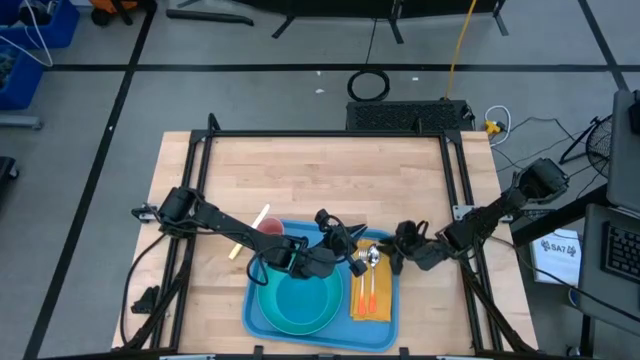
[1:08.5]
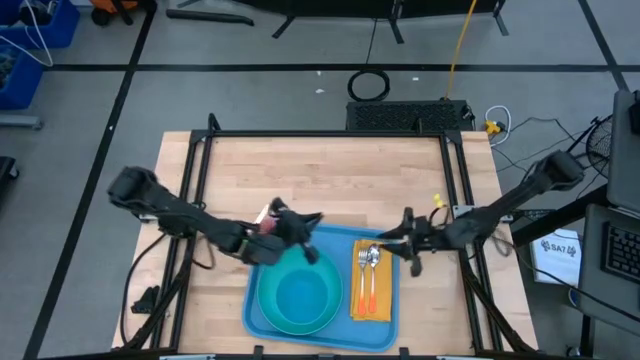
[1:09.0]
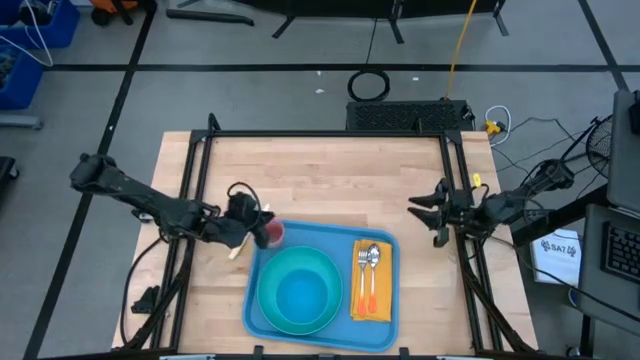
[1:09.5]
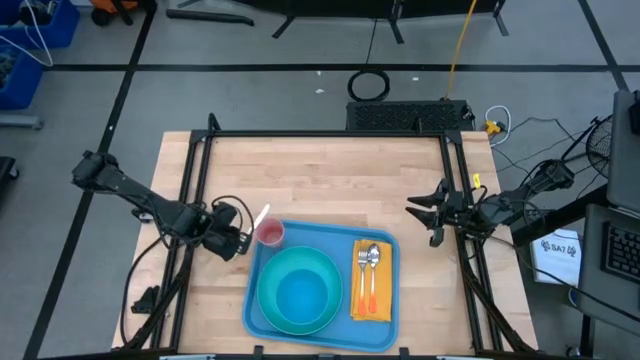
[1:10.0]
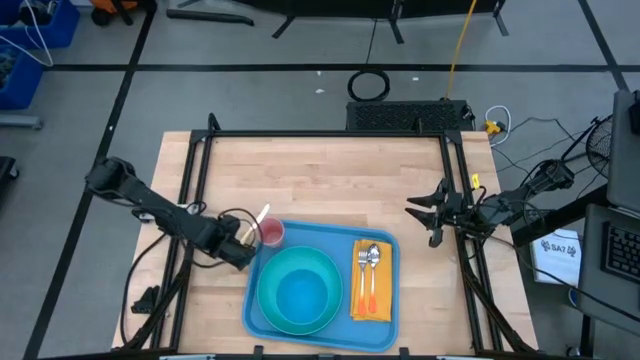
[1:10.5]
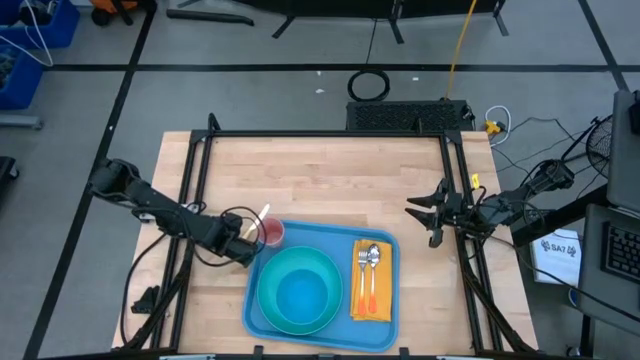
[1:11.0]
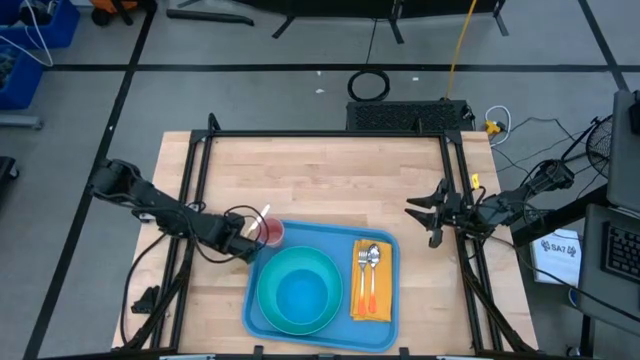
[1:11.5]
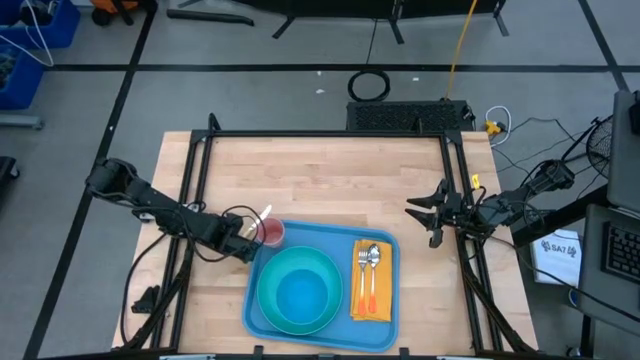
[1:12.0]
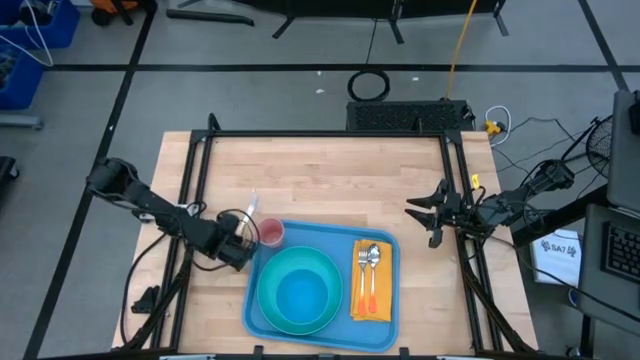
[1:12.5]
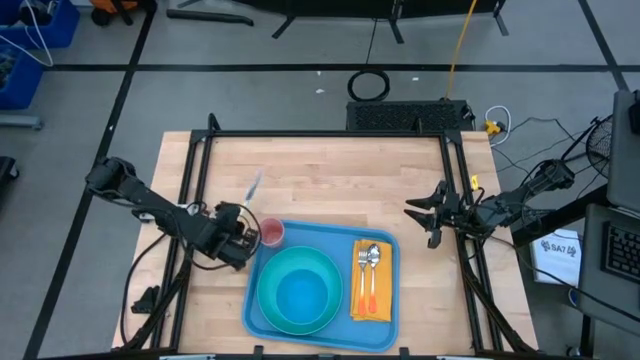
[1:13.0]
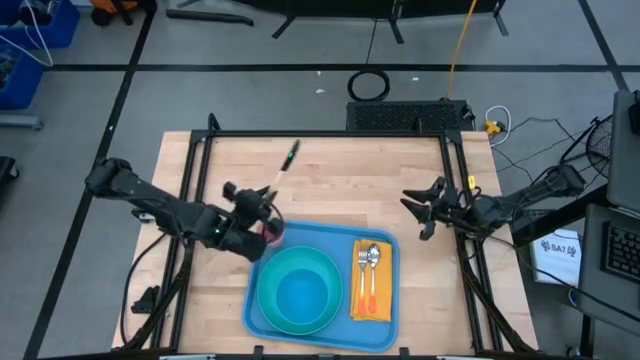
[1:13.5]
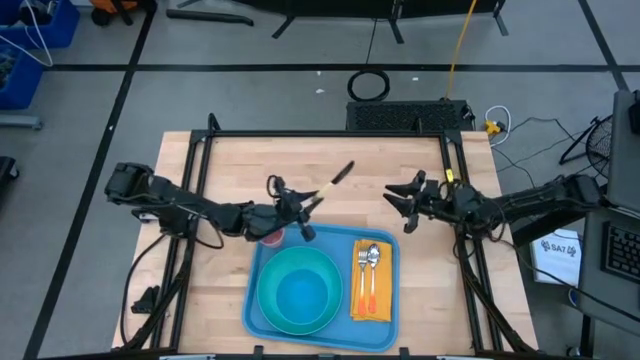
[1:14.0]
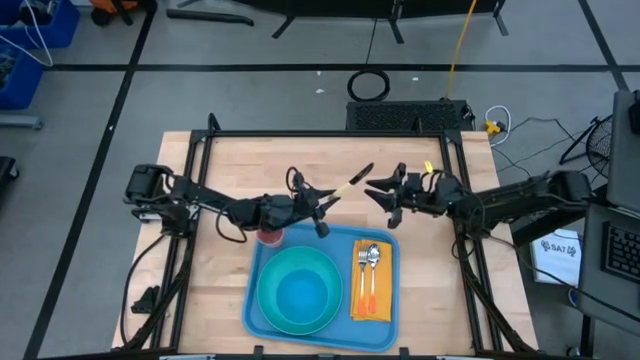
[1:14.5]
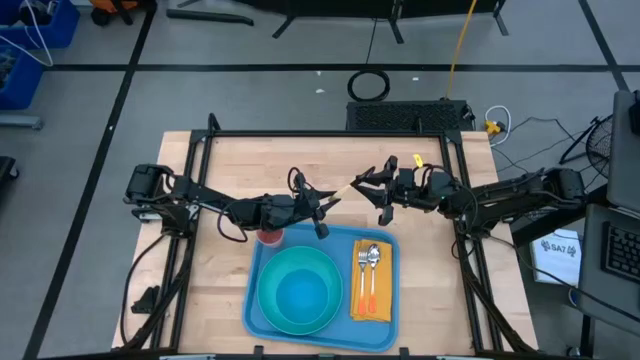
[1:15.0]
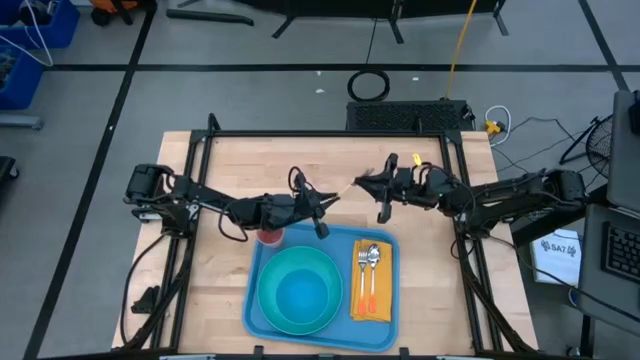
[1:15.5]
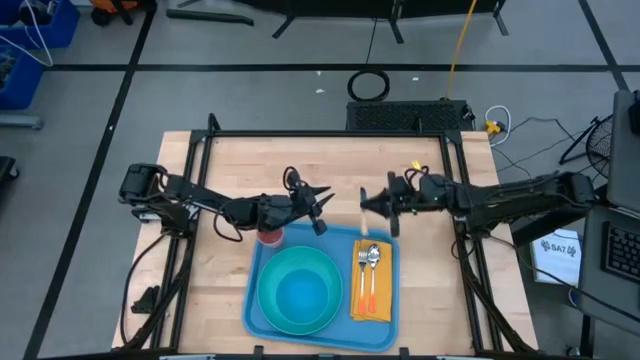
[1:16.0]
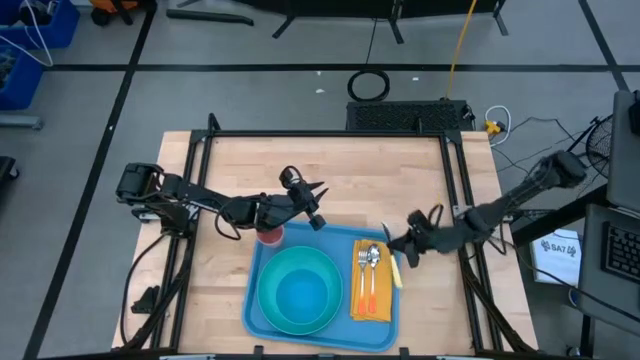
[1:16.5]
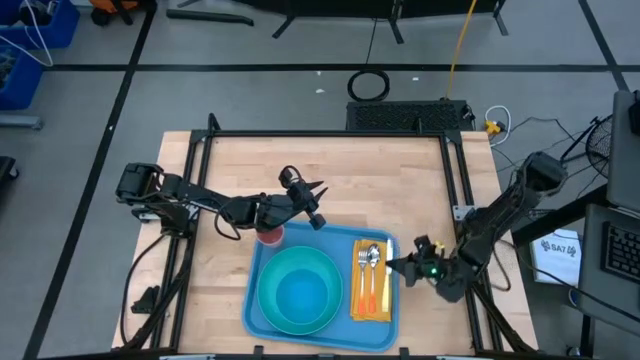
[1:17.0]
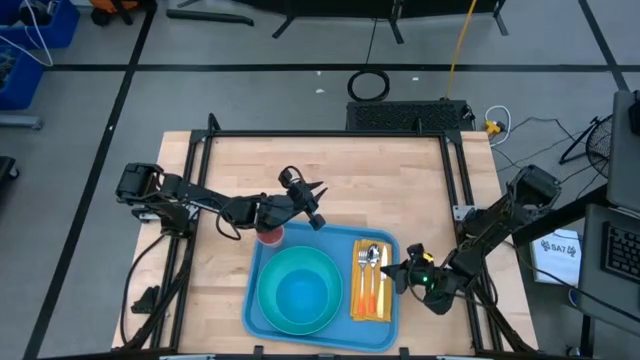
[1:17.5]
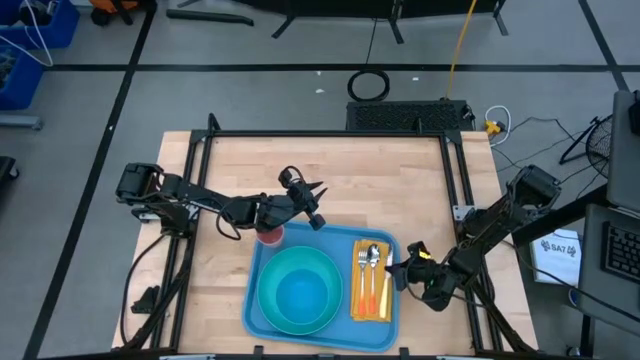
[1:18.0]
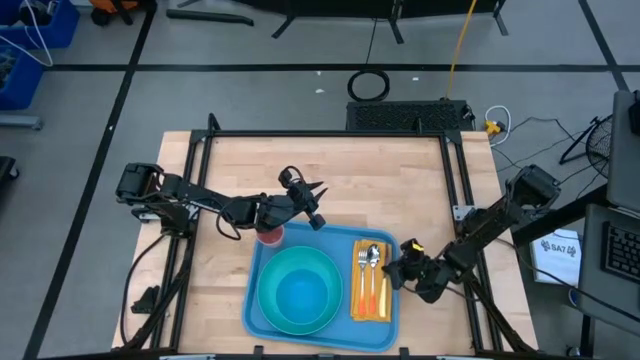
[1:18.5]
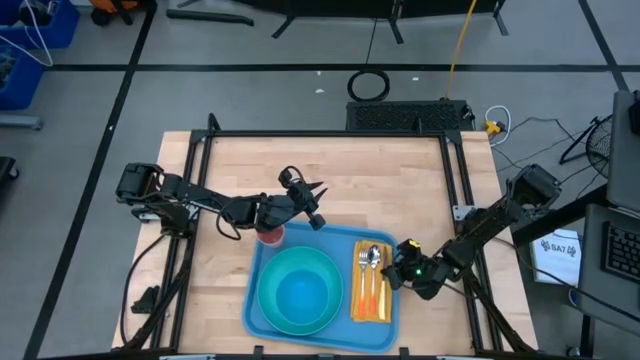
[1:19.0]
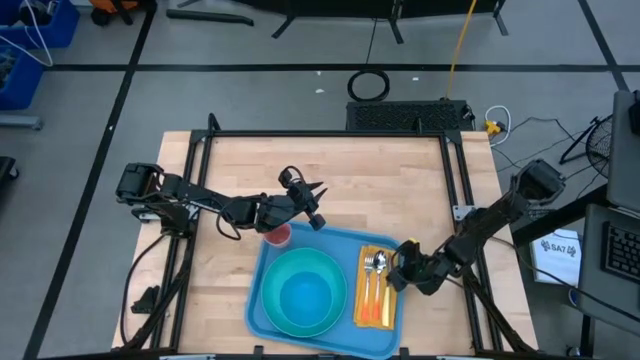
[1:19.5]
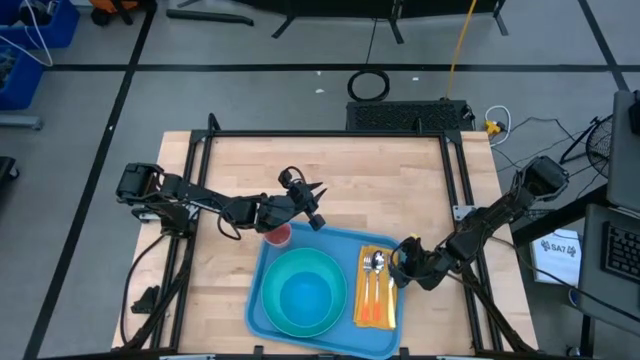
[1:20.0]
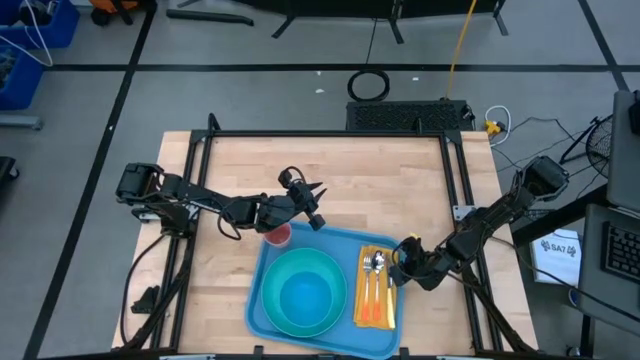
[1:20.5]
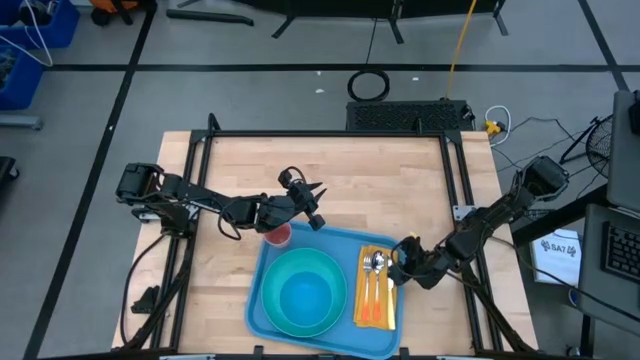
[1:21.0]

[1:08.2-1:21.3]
Task: Set up tray
Put the yellow knife on the yellow napkin to the right of the orange spoon

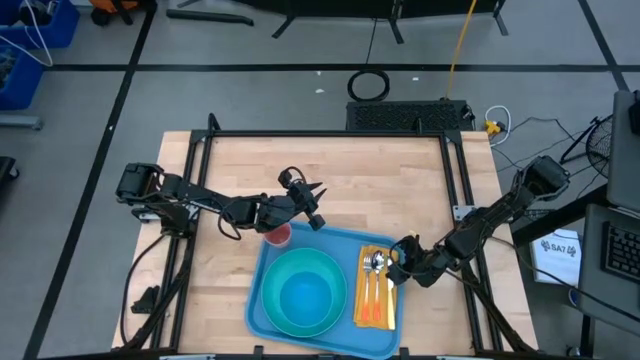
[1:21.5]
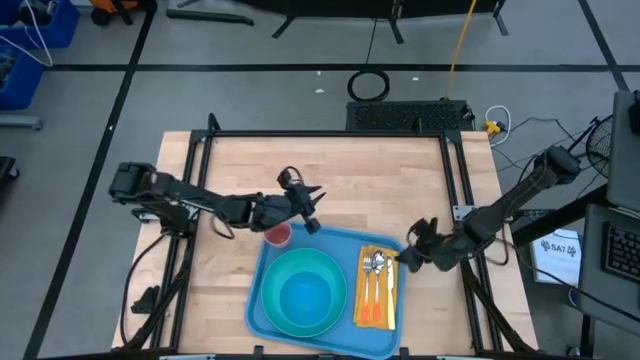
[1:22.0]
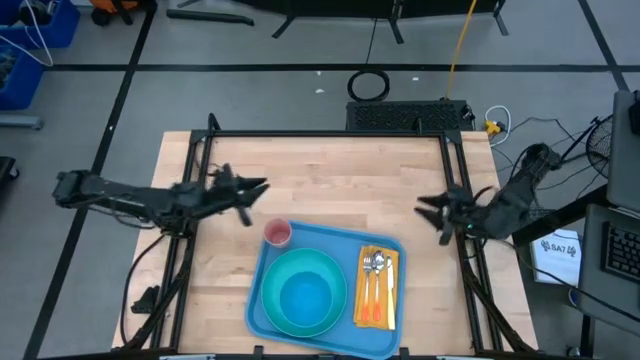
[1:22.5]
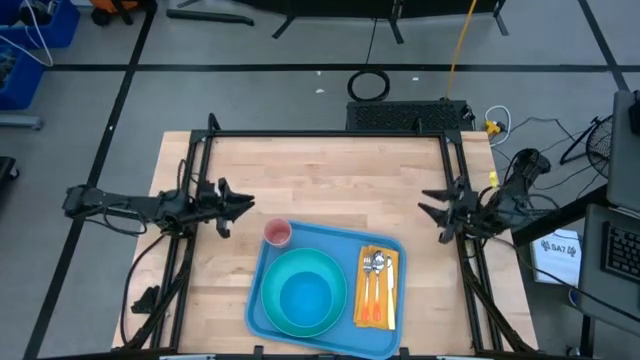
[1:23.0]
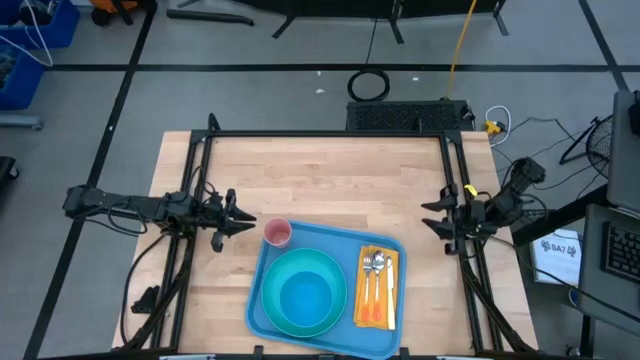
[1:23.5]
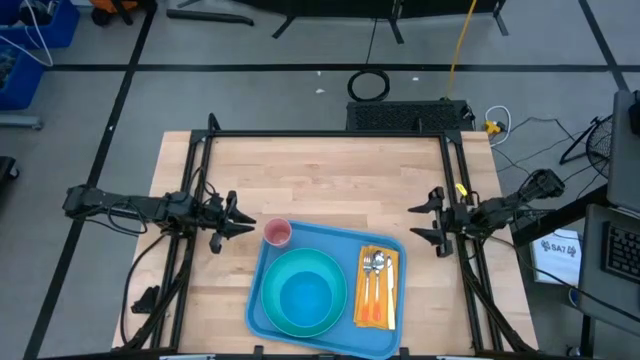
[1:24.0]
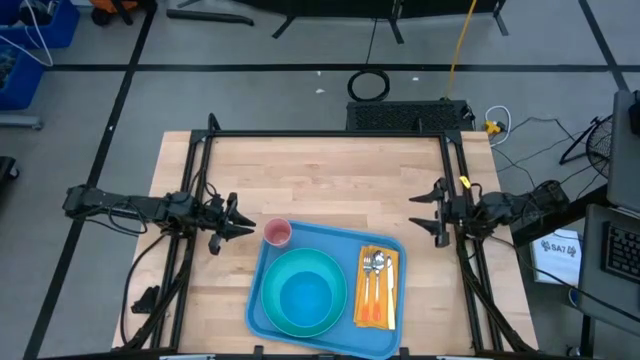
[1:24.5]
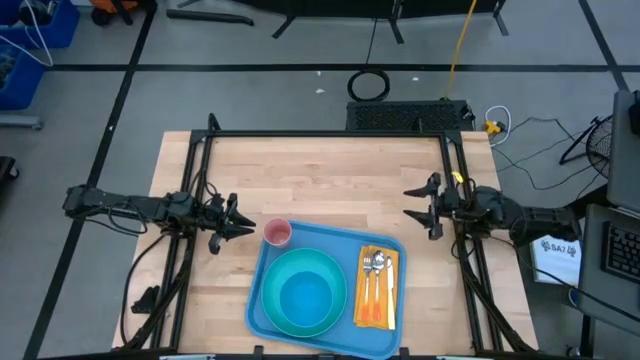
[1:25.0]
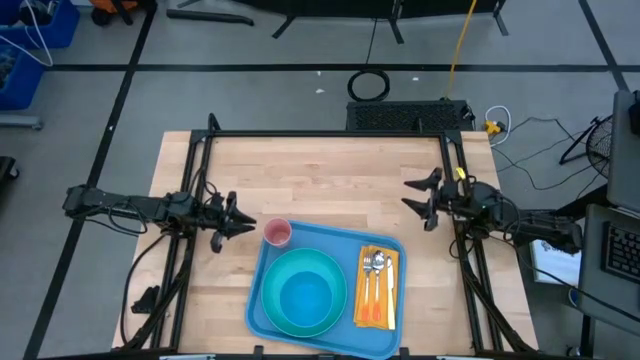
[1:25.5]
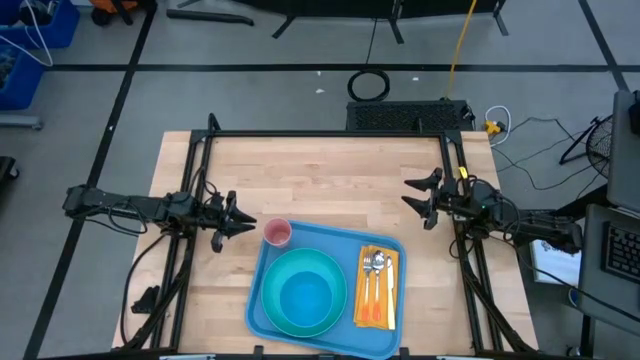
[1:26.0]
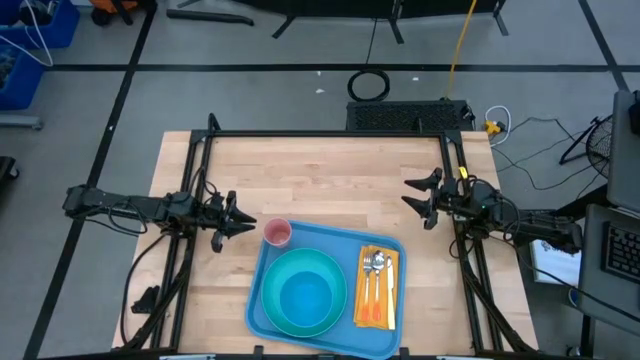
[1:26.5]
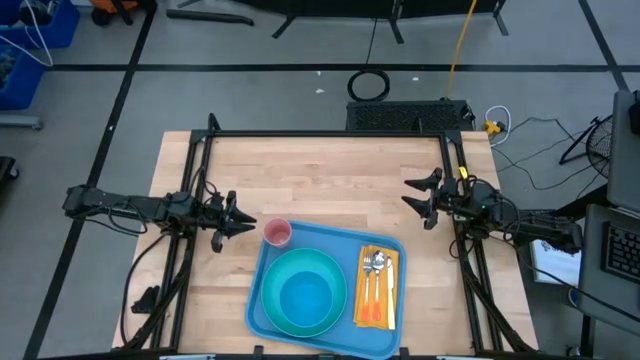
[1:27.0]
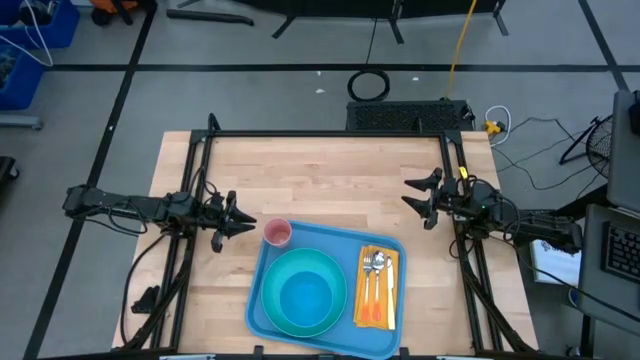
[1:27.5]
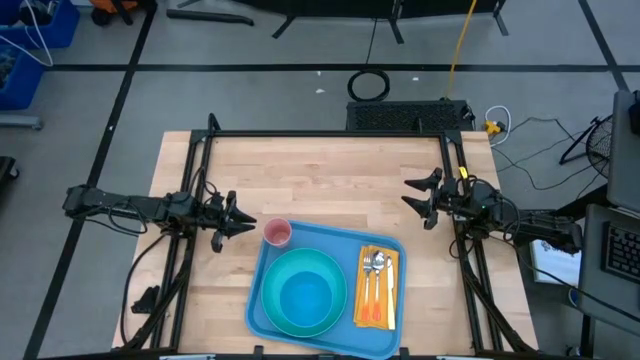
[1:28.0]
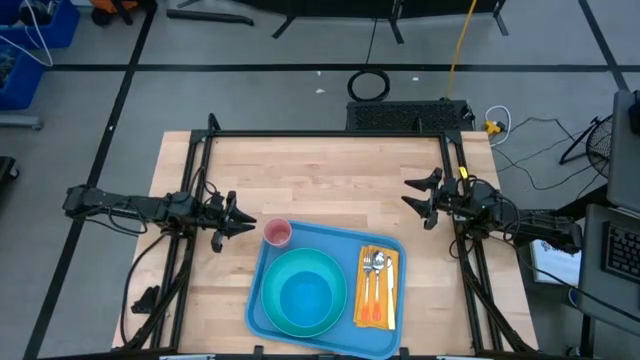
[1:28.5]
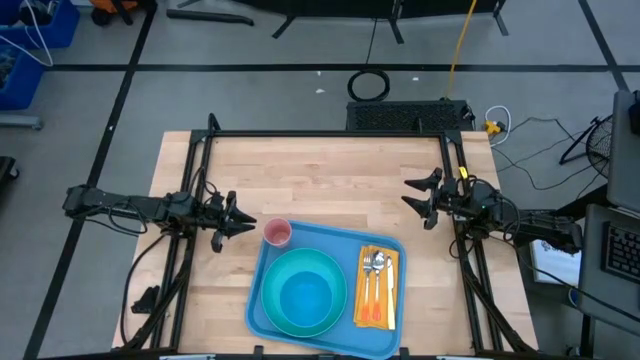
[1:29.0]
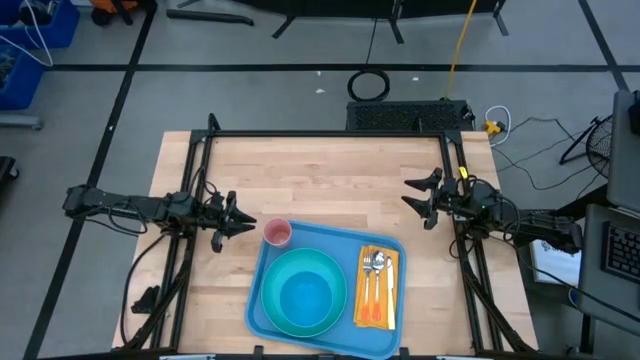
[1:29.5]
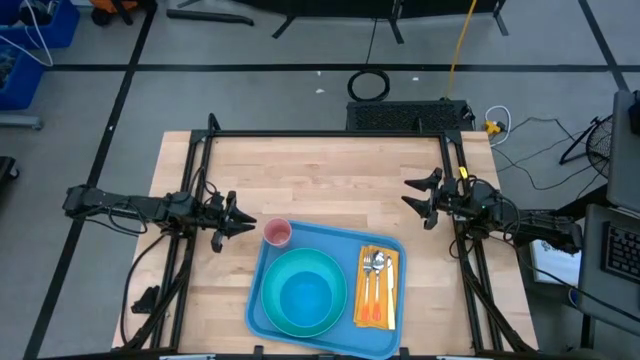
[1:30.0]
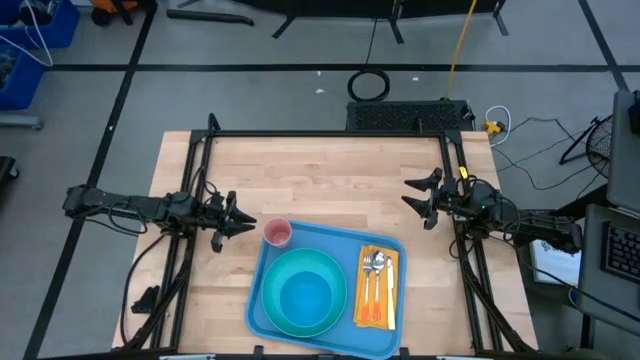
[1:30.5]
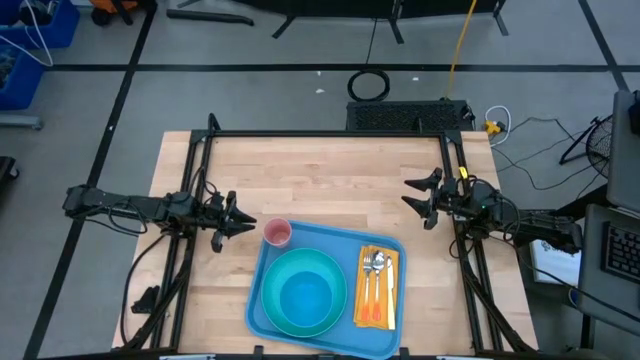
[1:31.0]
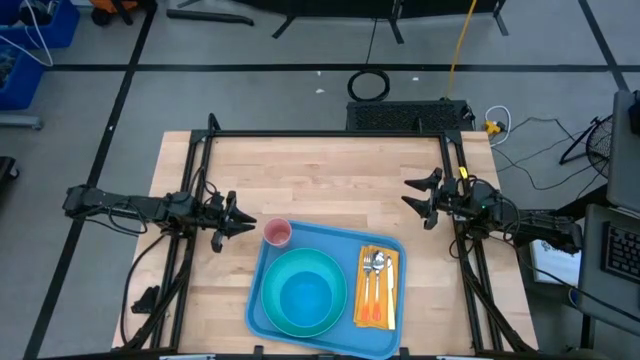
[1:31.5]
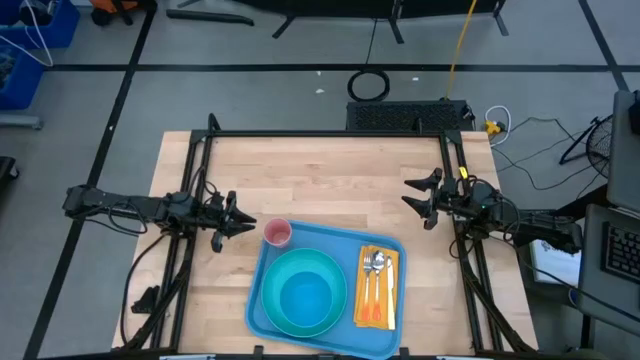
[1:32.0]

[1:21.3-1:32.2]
Return to Home Position
